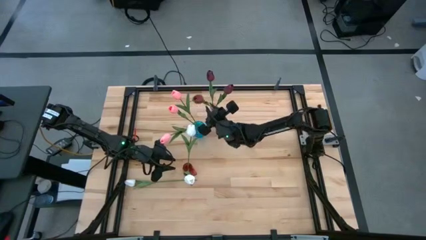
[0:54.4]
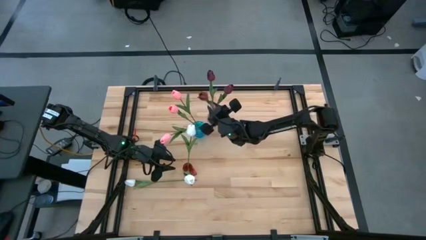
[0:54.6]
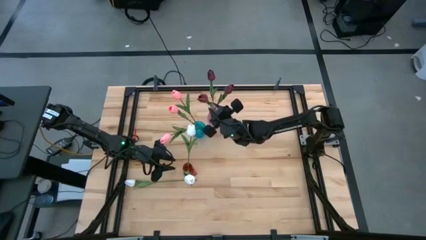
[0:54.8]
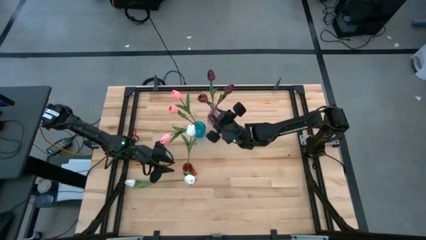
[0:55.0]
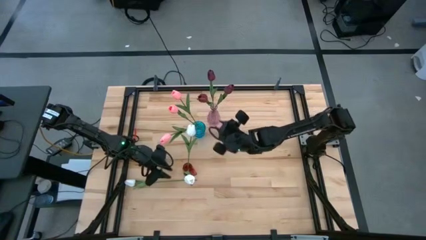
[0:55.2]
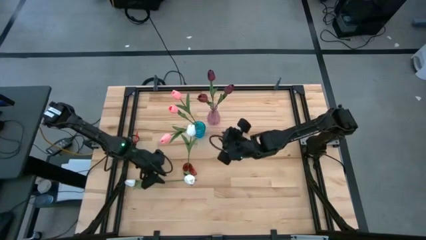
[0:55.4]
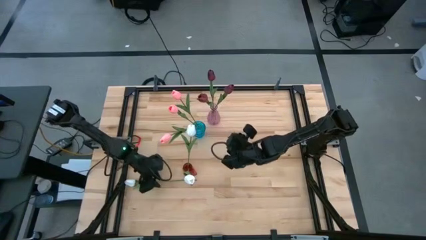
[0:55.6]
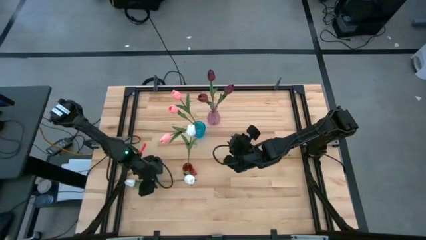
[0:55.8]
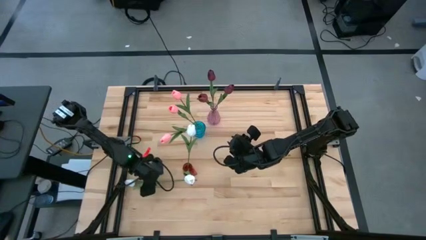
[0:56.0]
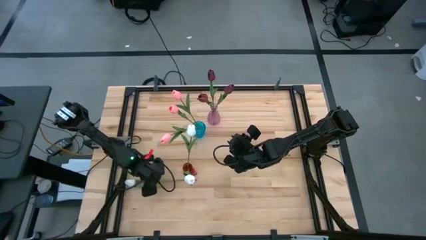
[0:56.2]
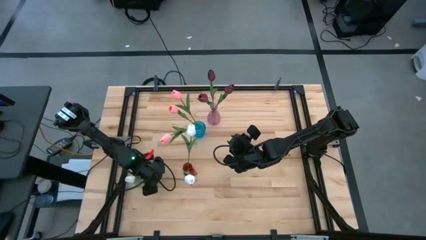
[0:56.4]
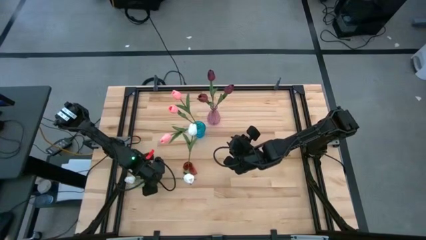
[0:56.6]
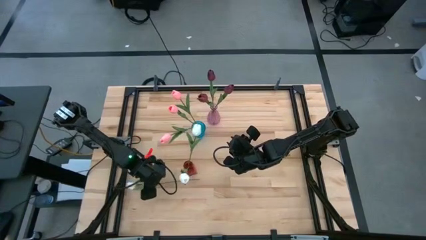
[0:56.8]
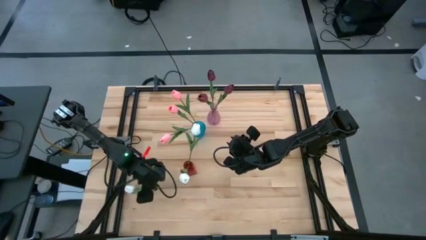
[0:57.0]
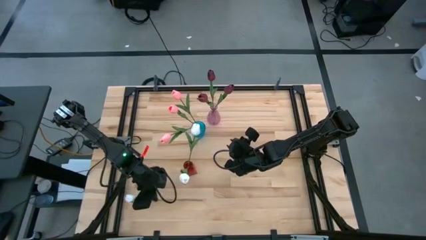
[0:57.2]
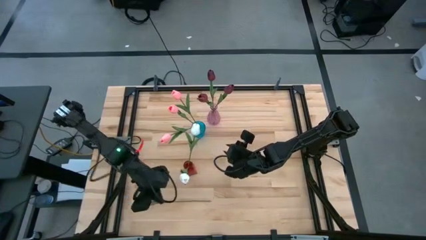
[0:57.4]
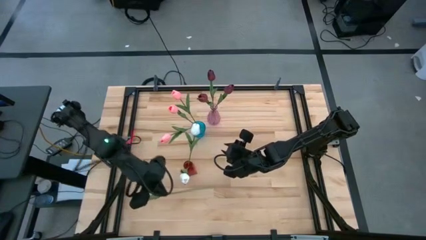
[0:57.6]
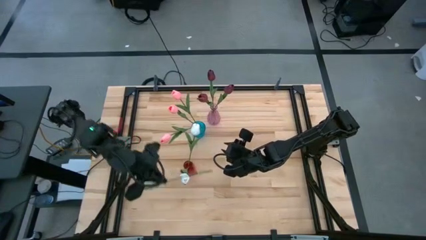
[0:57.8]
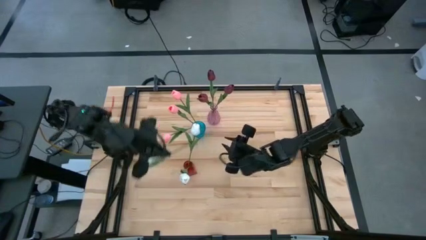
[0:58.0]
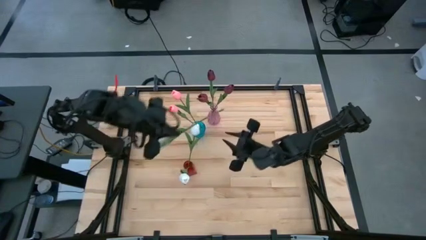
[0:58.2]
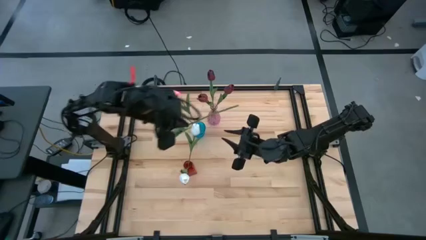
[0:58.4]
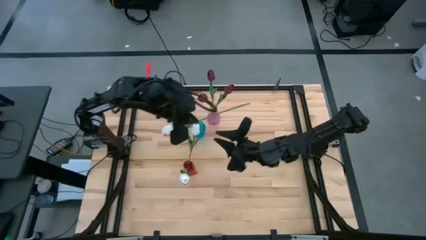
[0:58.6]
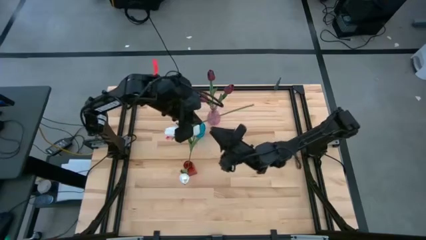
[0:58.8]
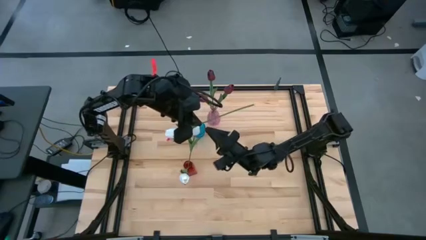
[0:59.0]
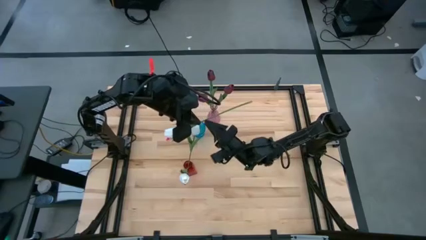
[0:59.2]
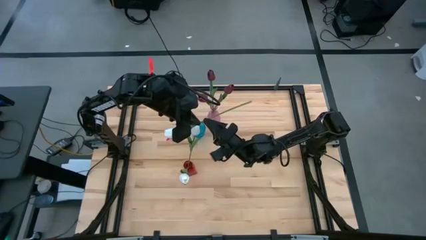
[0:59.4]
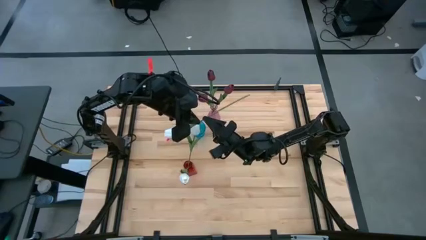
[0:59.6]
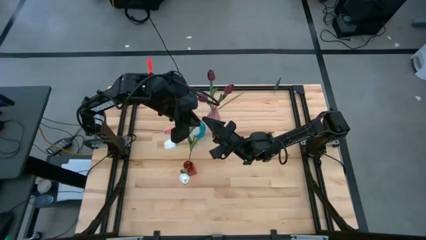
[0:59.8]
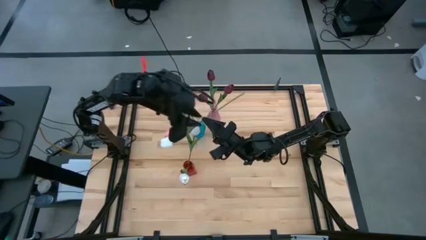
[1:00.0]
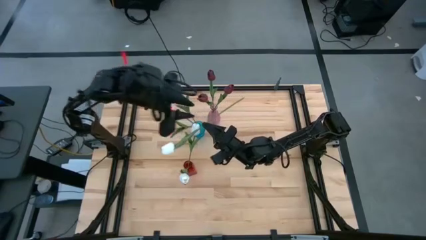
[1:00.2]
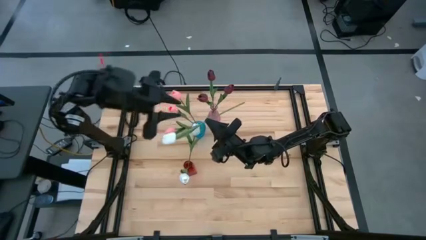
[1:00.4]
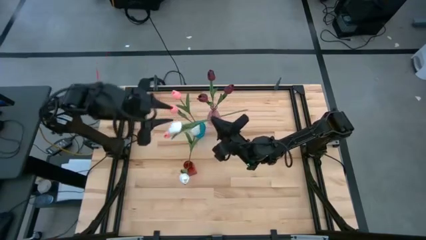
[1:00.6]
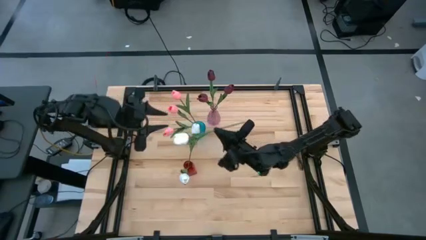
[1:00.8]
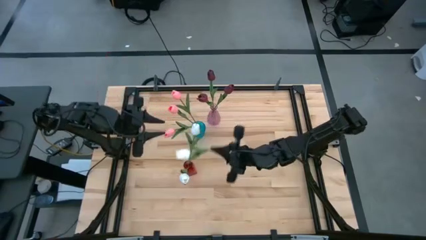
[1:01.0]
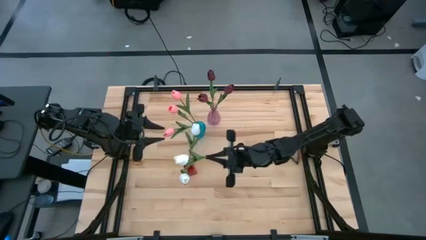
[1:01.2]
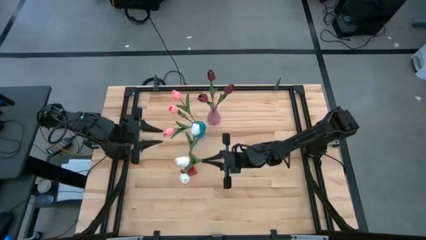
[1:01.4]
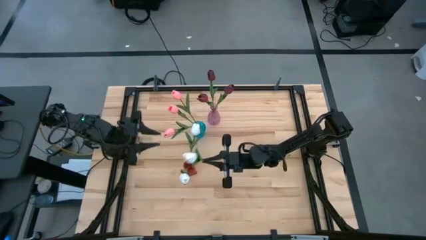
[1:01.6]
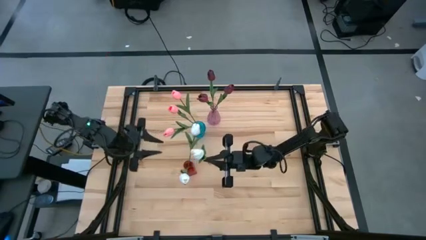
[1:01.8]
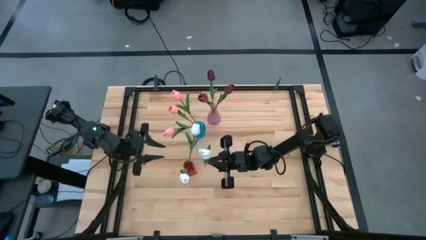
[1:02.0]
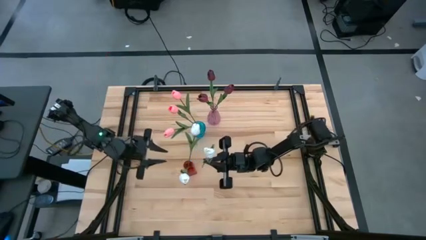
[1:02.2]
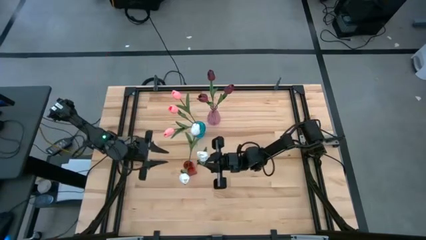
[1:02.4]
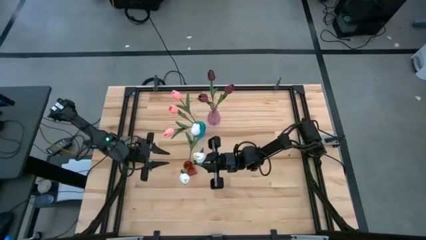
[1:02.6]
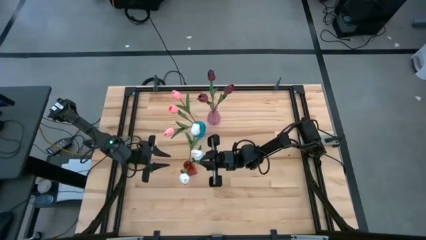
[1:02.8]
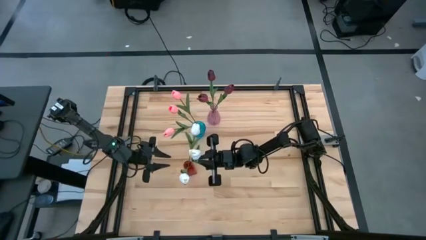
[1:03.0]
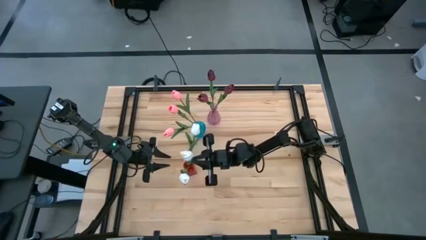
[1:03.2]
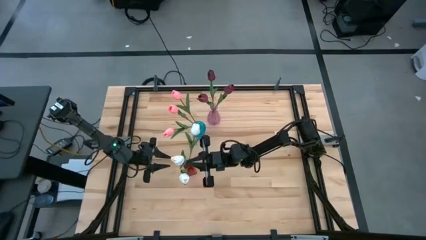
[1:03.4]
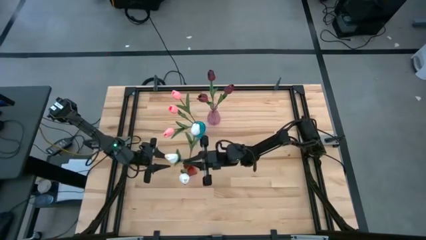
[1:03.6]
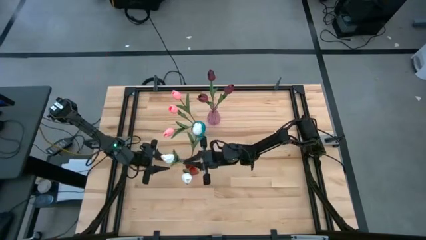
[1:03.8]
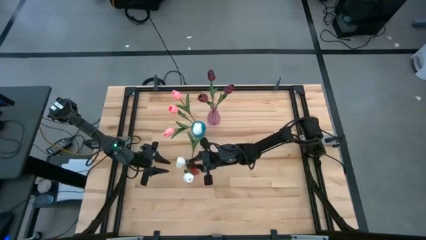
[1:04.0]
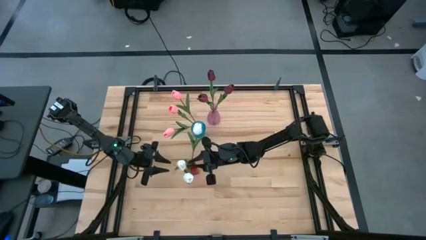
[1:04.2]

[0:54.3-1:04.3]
Task: Sort flowers into vase by color
Put the white flower into the red vase

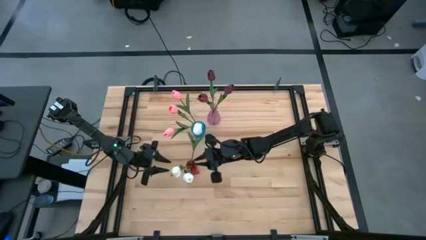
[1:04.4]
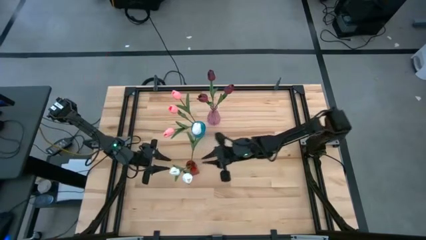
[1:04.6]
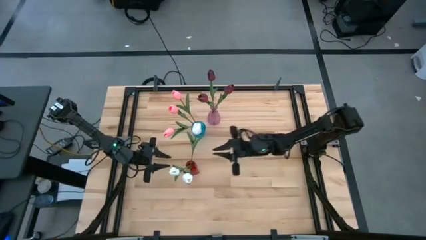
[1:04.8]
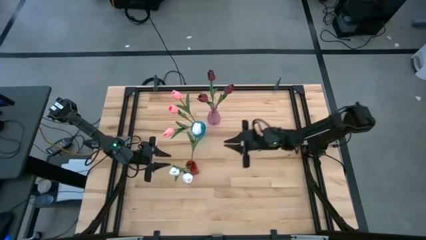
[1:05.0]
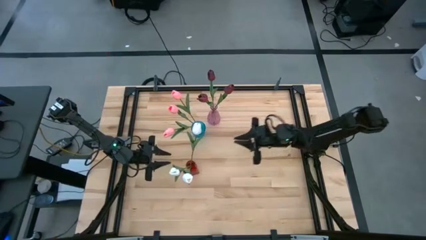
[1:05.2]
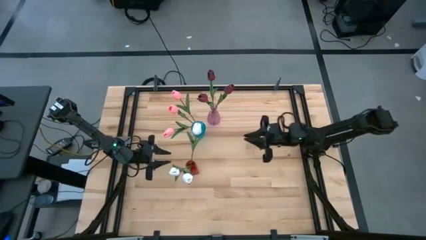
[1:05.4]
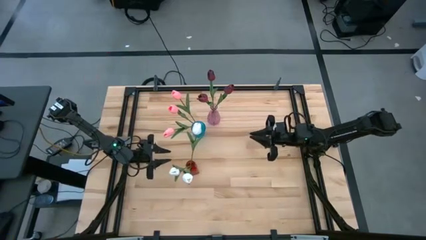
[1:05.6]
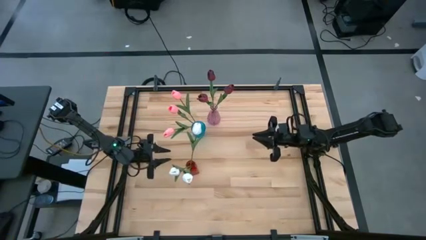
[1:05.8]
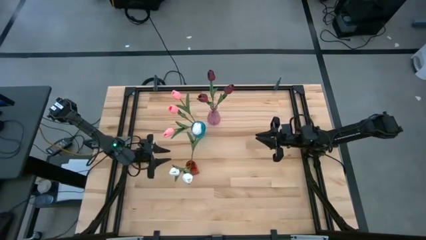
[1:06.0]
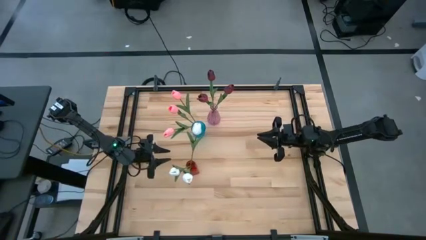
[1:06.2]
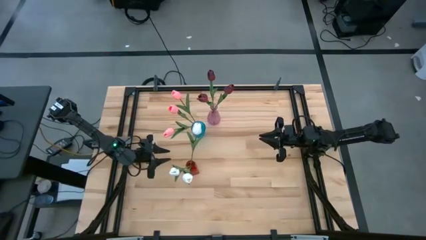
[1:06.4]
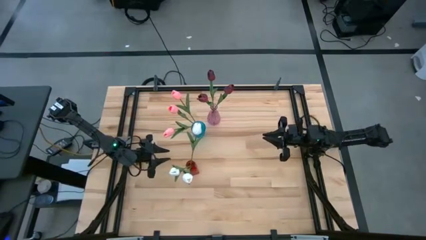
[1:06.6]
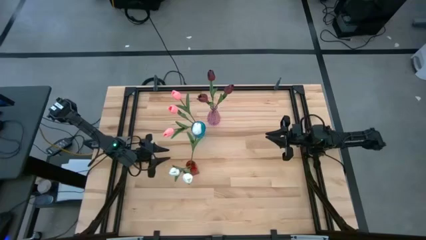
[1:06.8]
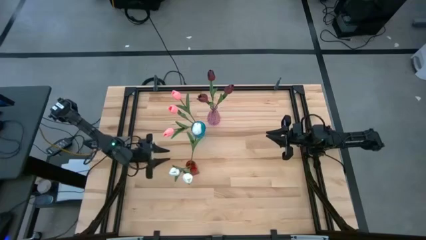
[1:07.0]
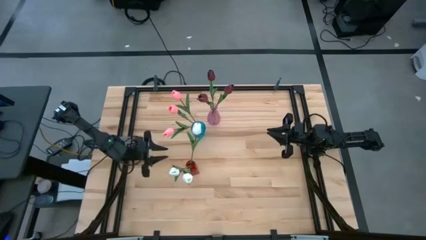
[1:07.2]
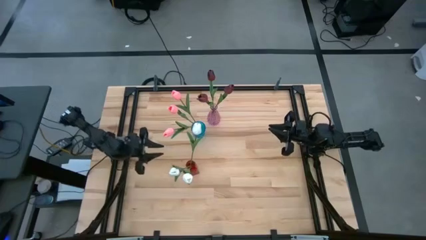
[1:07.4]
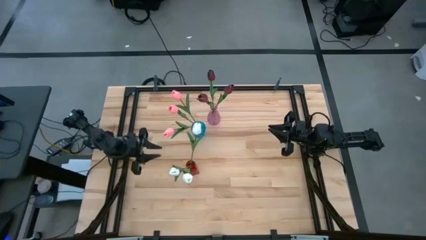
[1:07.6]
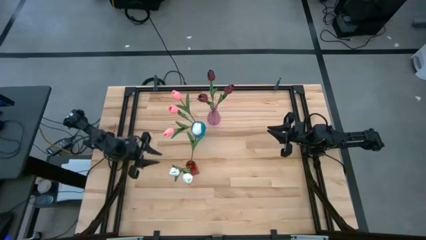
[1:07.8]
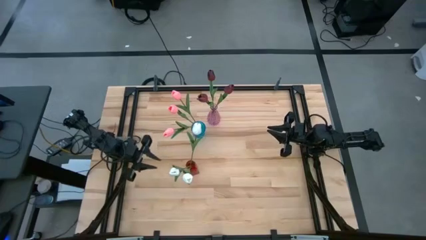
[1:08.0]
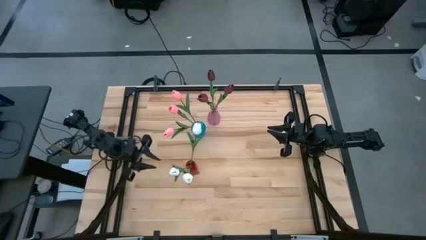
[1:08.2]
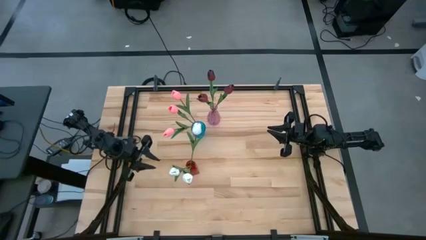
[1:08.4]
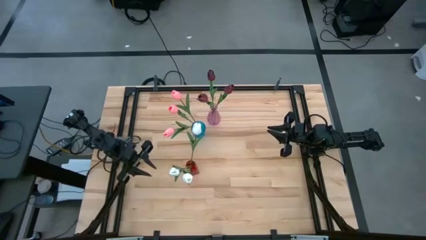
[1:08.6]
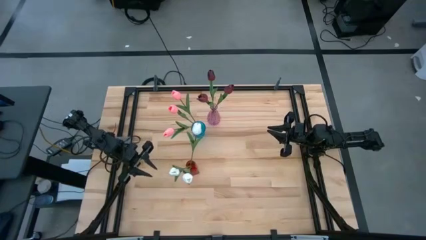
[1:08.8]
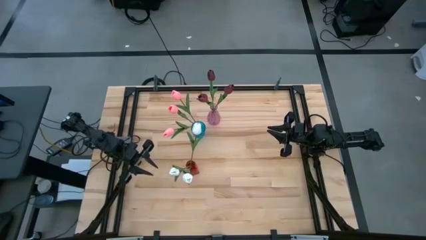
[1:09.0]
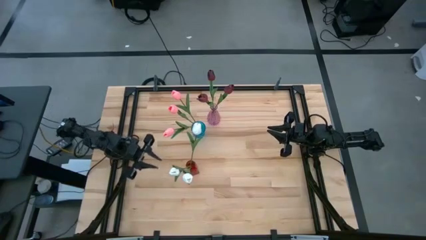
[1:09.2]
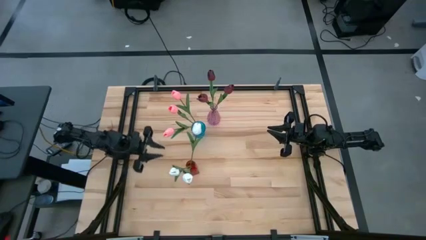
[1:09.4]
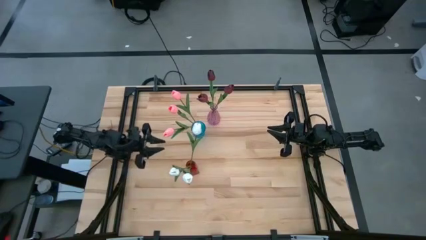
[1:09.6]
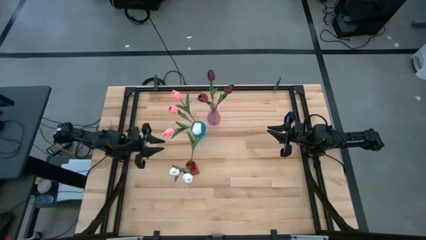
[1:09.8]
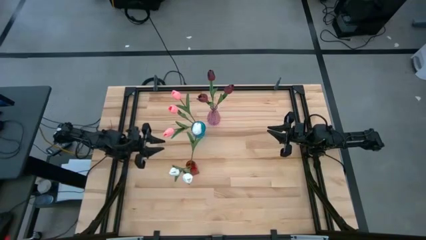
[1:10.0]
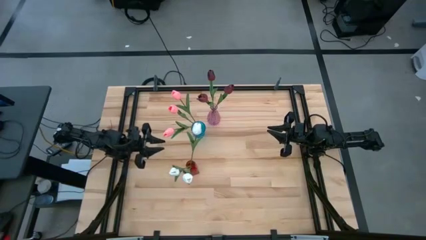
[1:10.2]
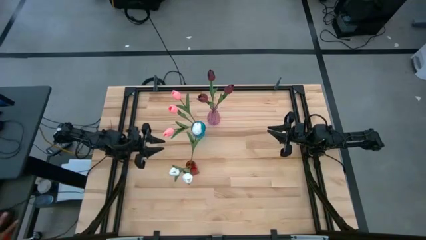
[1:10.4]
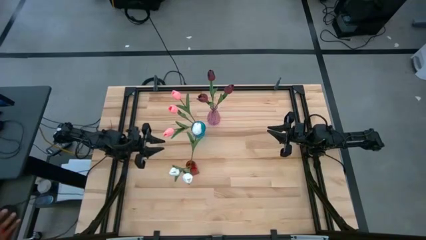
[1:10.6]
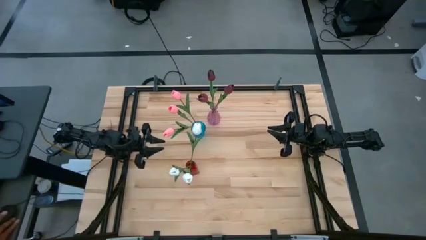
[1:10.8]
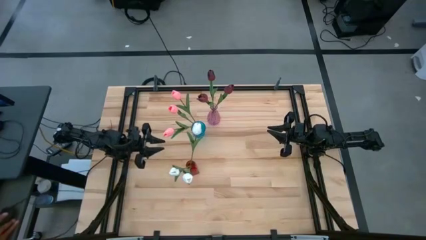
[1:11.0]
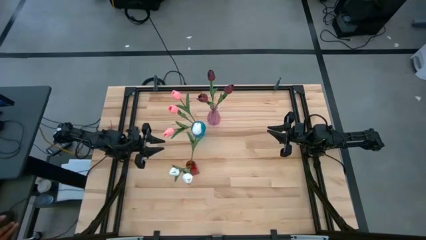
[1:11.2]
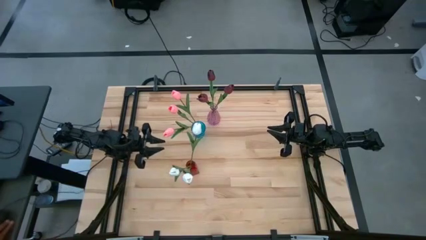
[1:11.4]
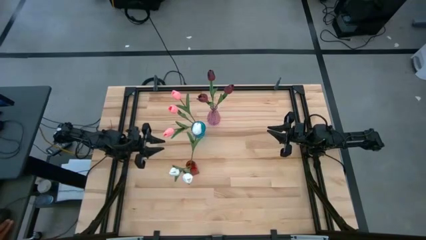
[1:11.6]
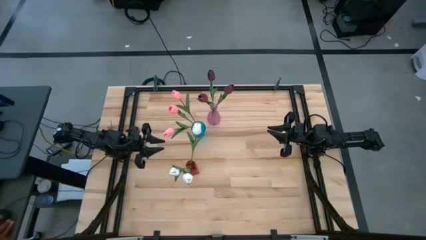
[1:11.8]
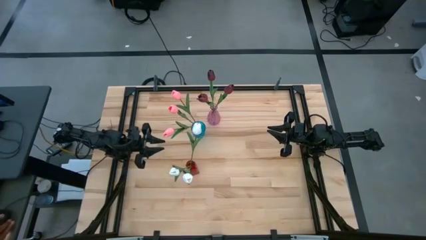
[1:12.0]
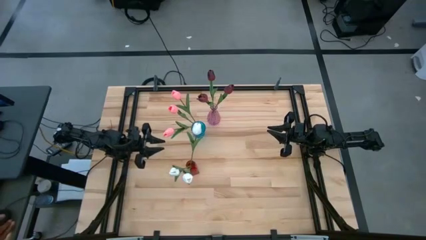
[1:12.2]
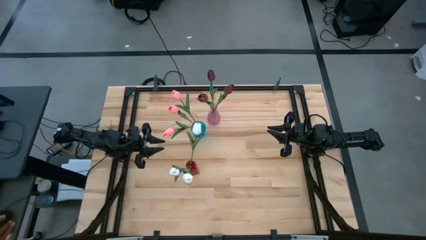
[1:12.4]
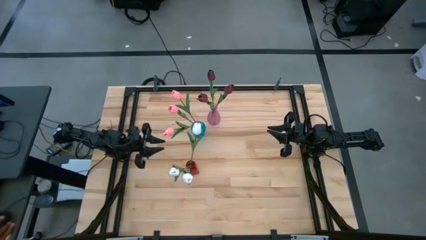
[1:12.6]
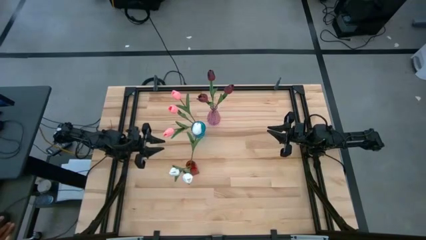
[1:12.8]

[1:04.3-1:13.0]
Return to Home Position
